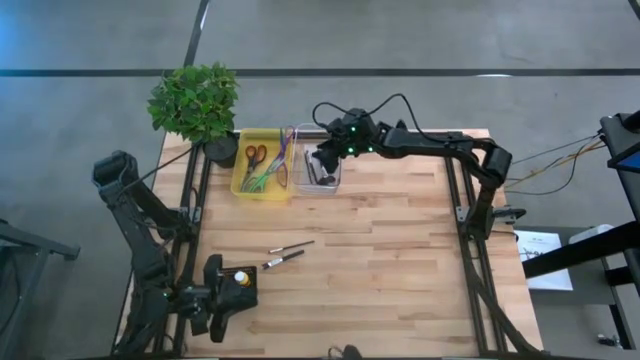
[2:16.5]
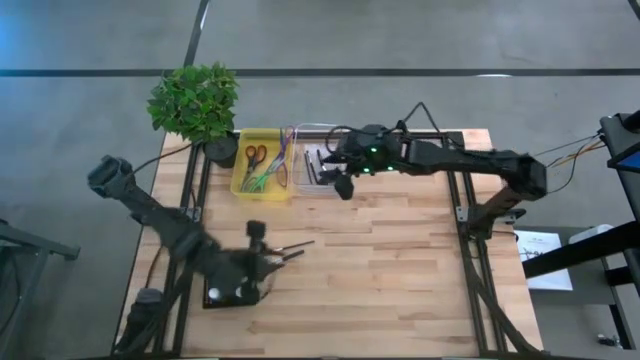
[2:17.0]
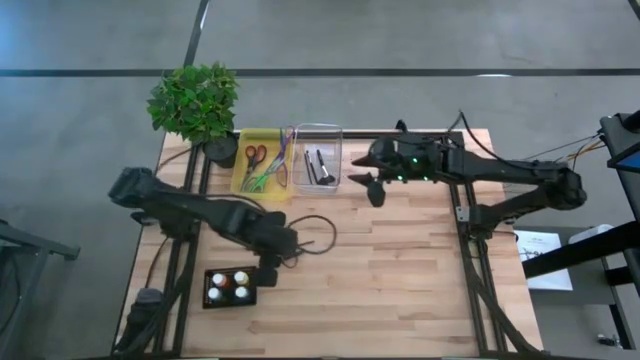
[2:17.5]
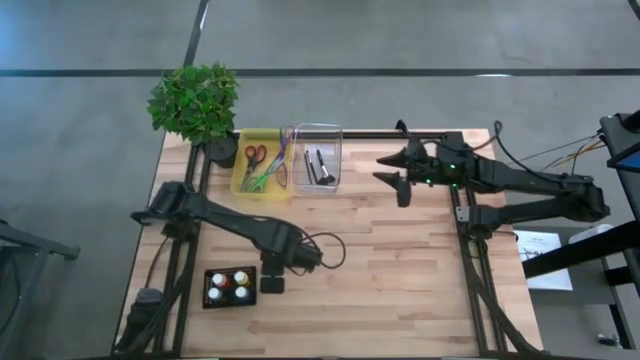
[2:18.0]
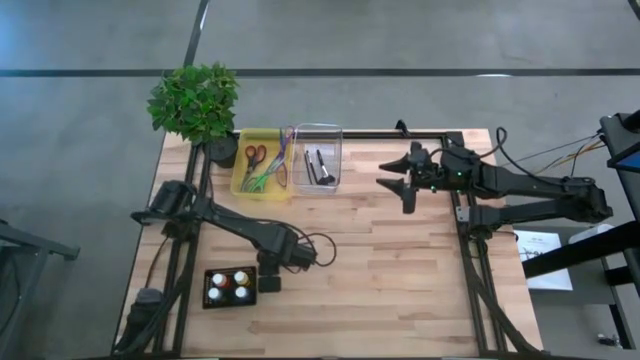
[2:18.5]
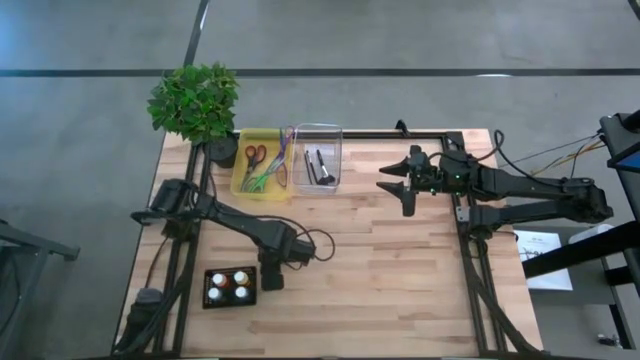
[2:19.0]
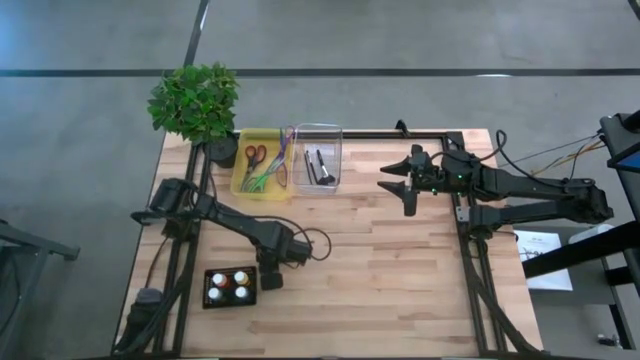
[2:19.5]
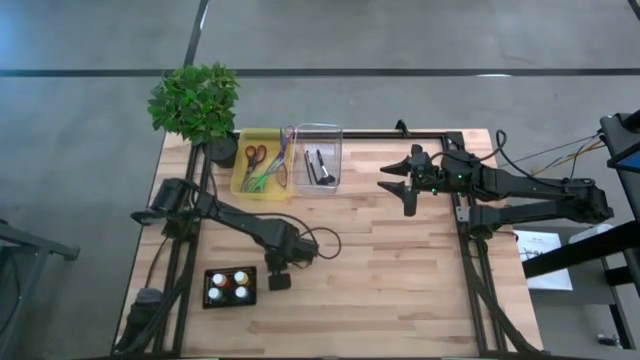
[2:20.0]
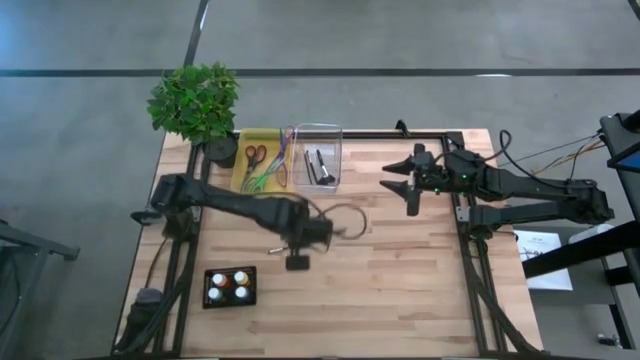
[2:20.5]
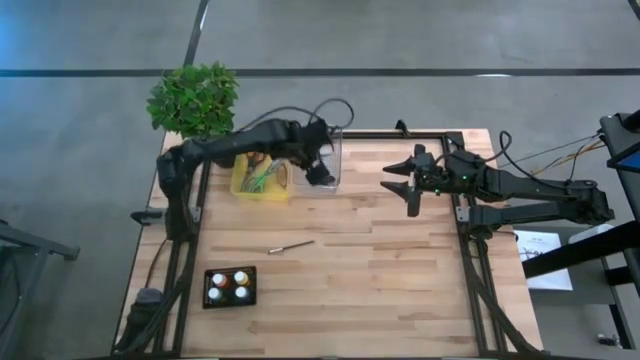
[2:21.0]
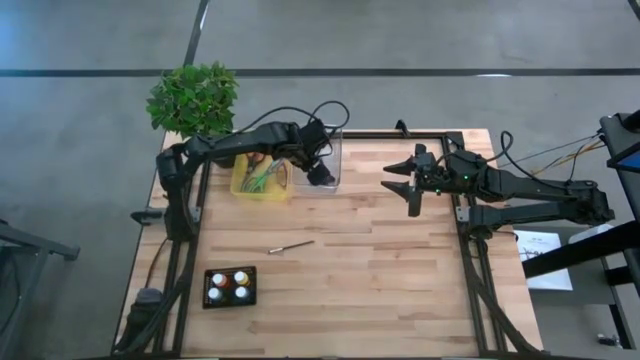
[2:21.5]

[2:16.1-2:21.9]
Task: Pick & Place Paint Supplies
Put the black foundation brush into the transparent bin

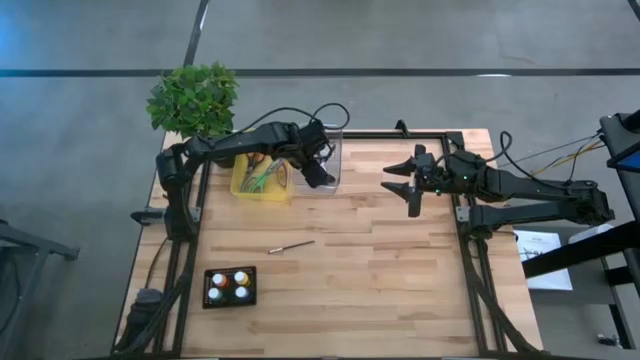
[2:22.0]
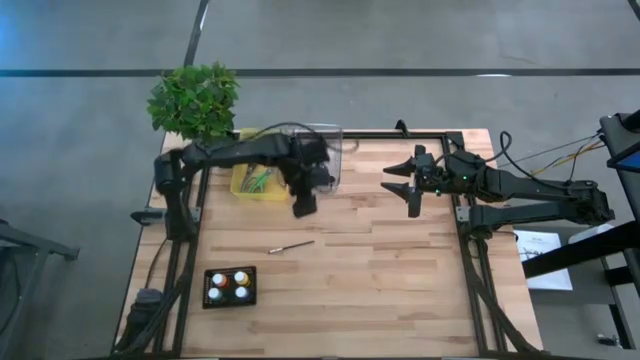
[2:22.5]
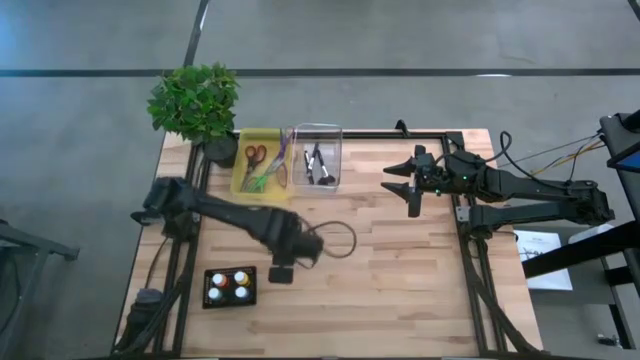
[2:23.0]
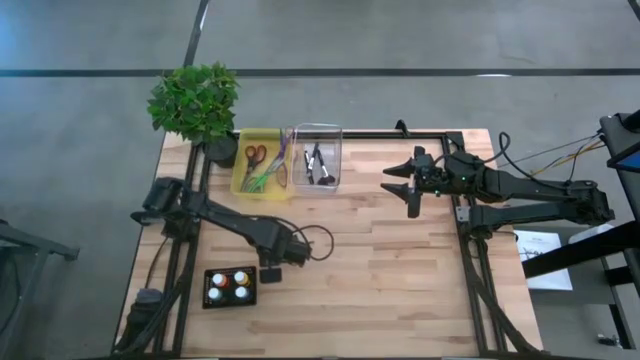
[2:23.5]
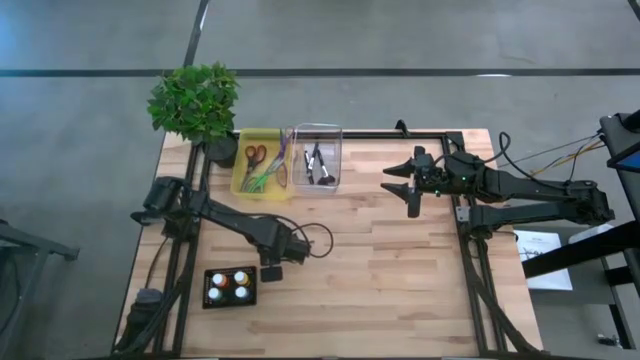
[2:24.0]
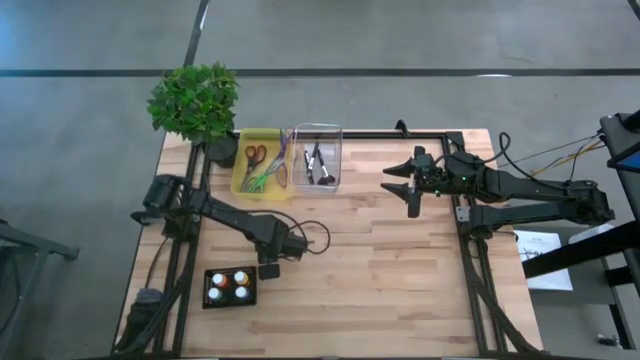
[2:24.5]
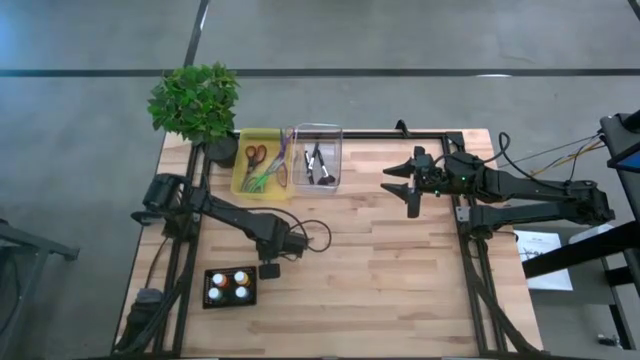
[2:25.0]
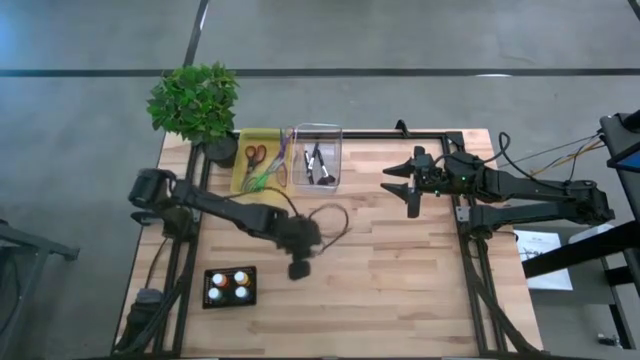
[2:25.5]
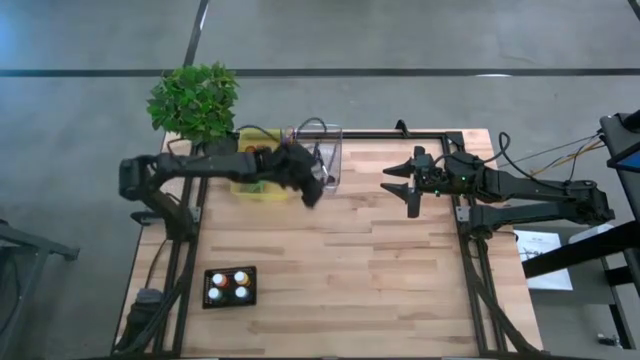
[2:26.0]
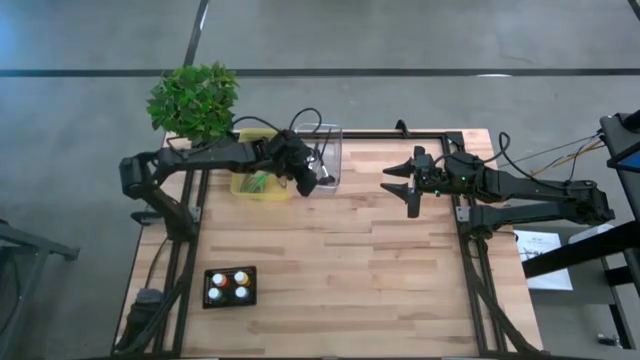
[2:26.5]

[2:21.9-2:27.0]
Put the silver and black paintbrush into the transparent bin

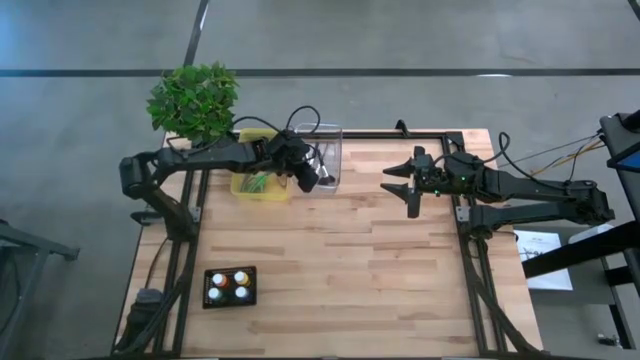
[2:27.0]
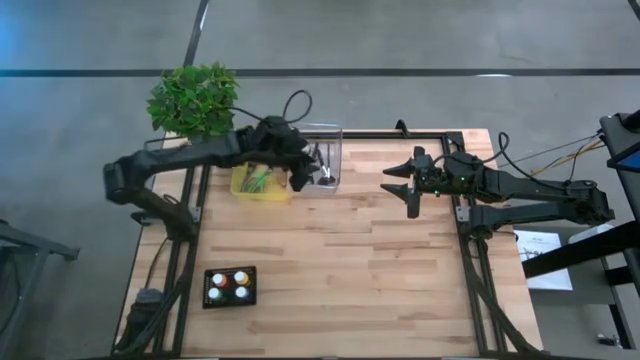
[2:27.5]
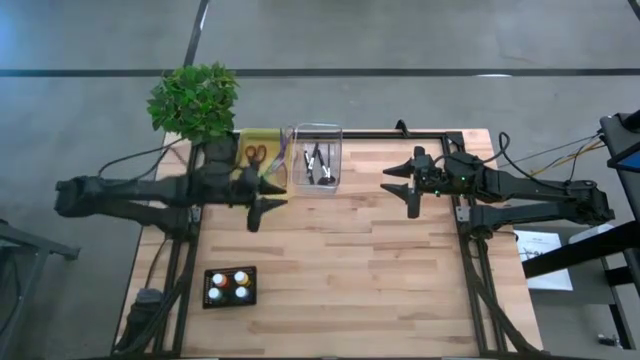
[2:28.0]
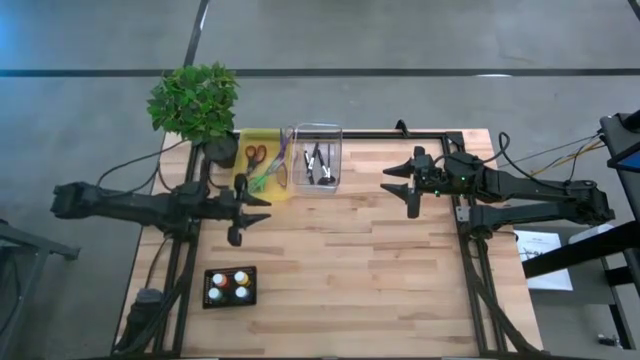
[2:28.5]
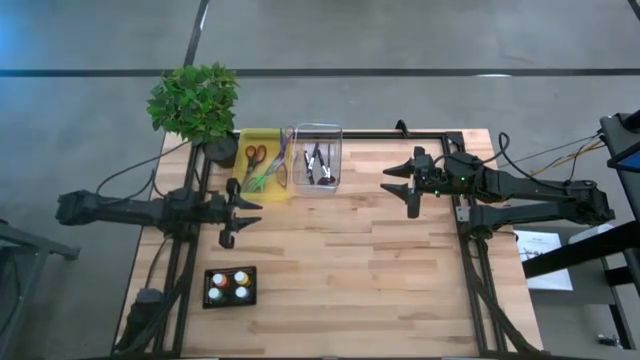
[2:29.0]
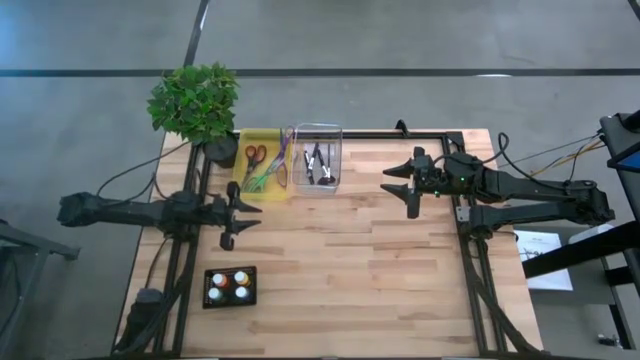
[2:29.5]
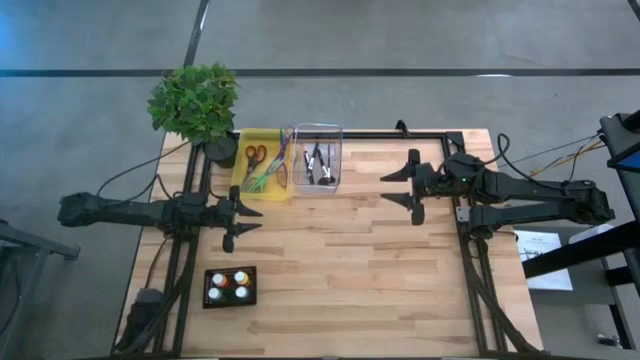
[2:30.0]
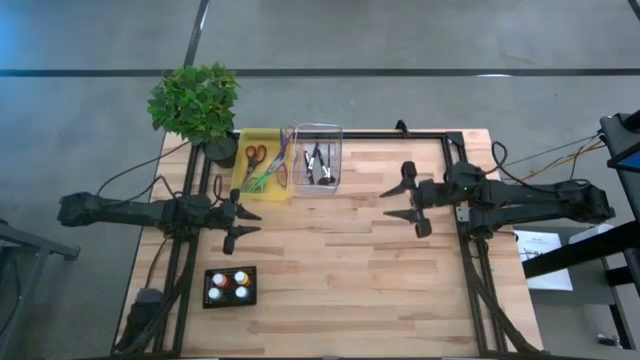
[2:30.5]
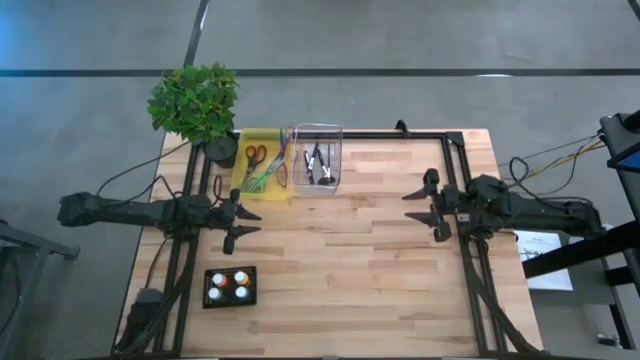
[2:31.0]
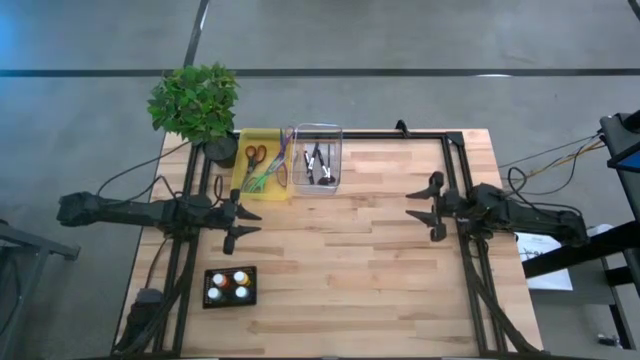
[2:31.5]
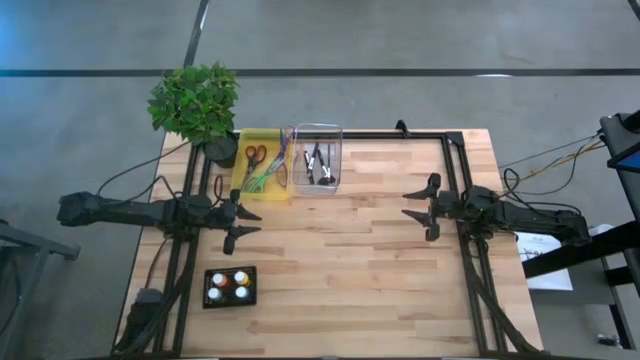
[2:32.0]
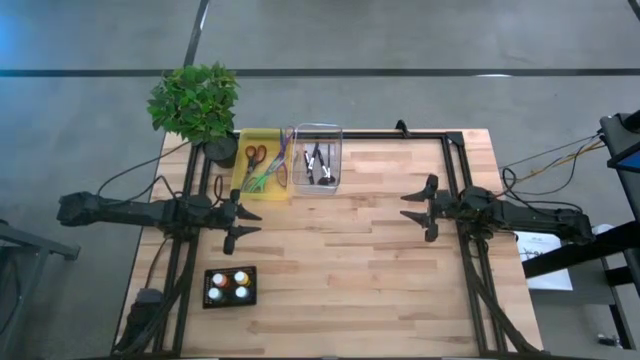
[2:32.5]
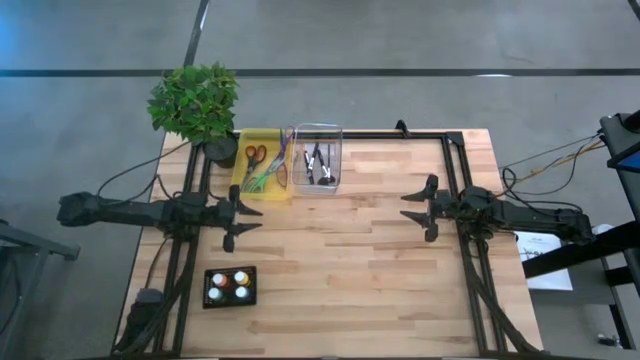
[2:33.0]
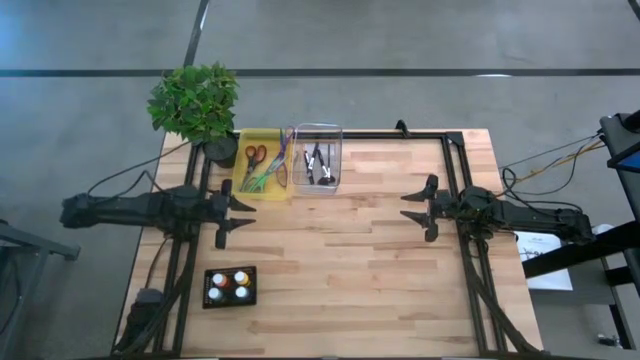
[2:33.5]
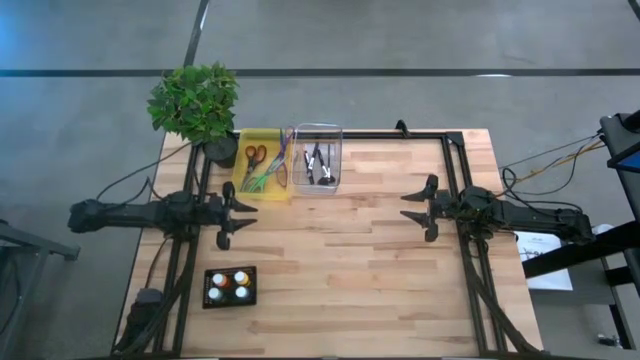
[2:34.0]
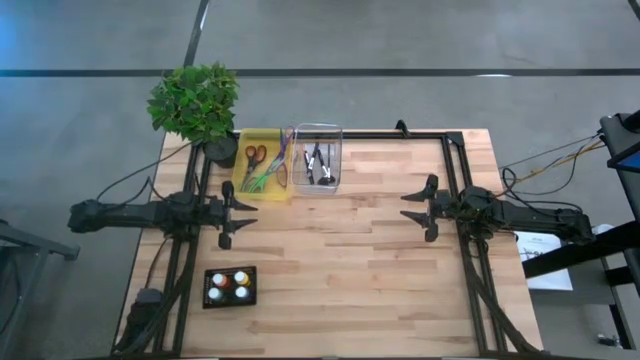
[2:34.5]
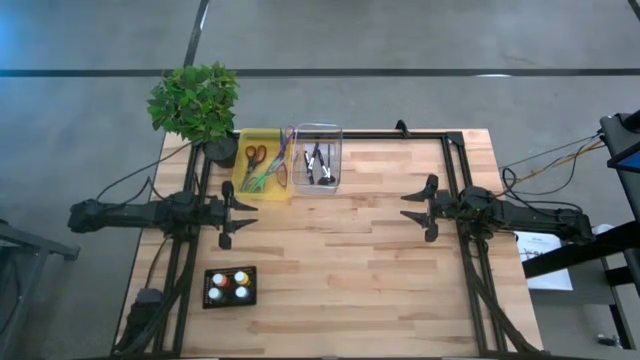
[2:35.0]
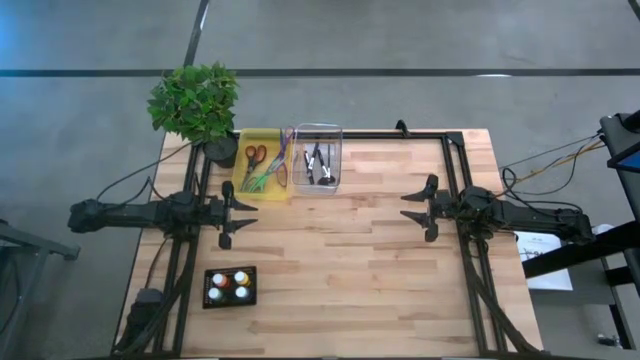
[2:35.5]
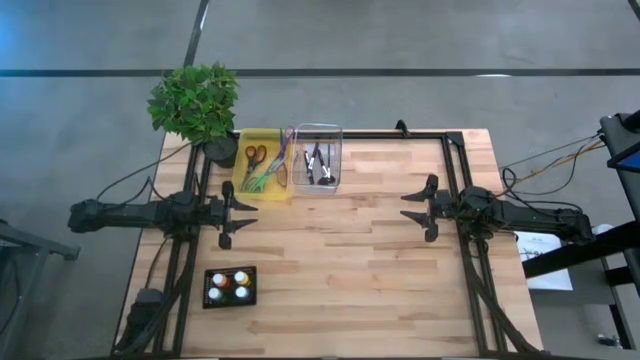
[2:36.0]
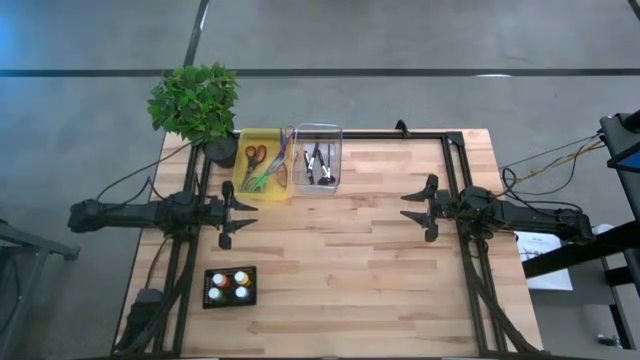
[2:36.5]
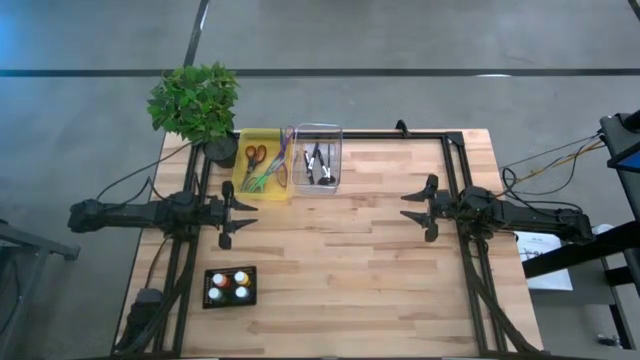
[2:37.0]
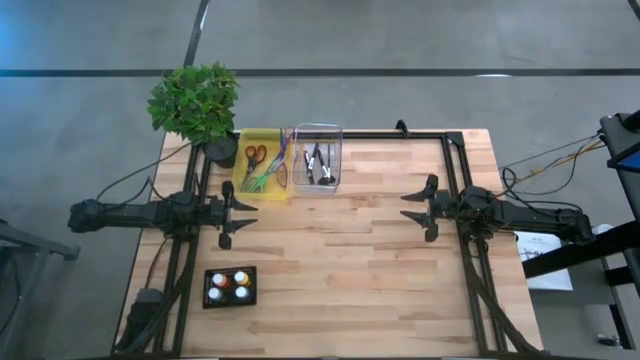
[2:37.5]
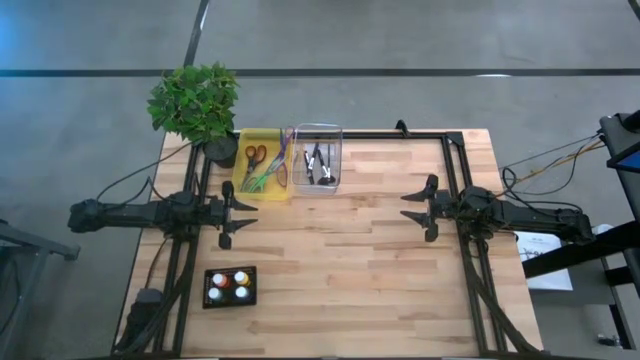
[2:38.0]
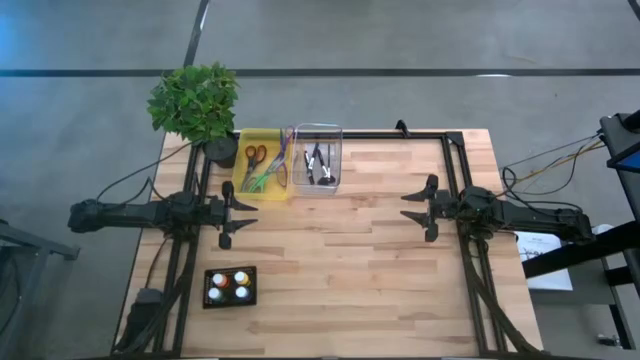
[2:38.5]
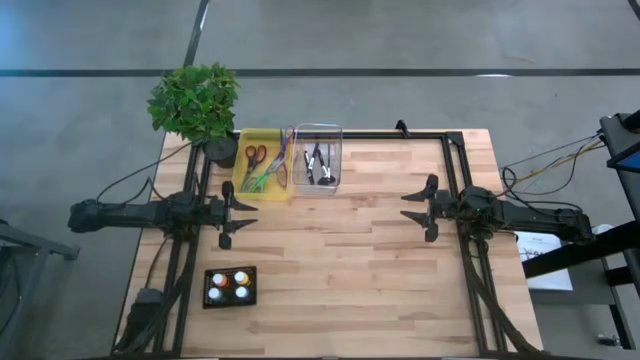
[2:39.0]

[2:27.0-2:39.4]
Return to home position
